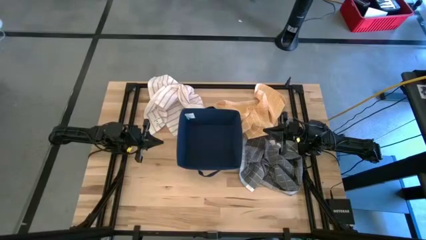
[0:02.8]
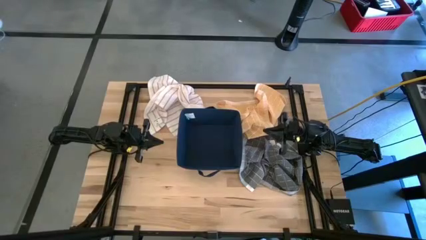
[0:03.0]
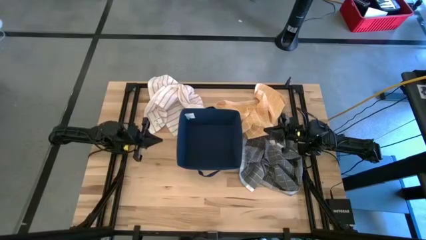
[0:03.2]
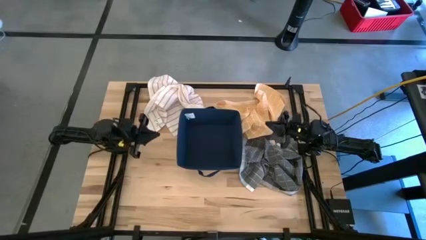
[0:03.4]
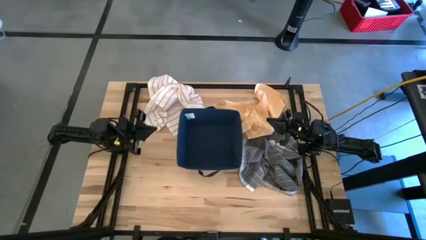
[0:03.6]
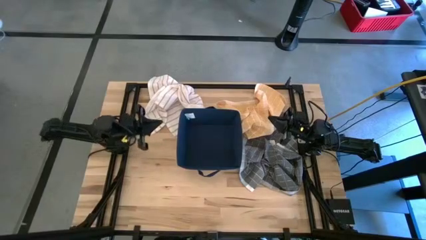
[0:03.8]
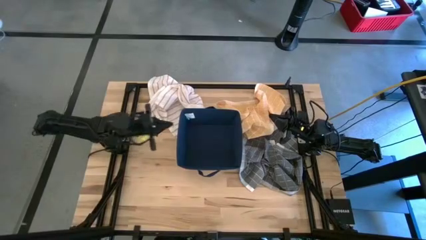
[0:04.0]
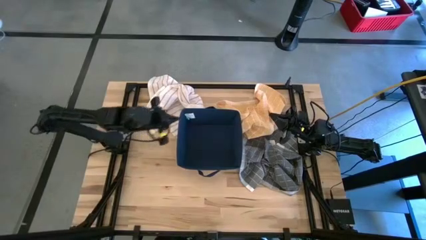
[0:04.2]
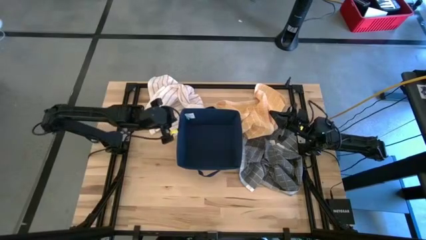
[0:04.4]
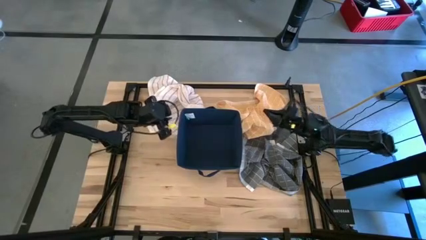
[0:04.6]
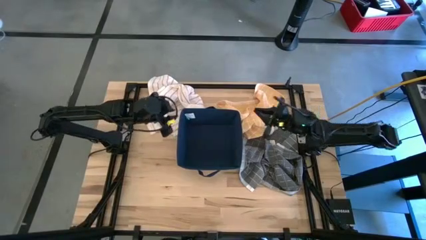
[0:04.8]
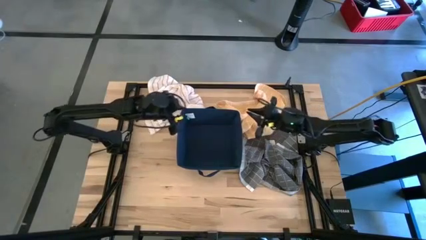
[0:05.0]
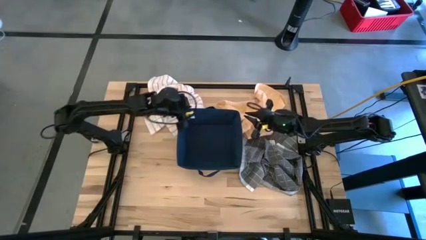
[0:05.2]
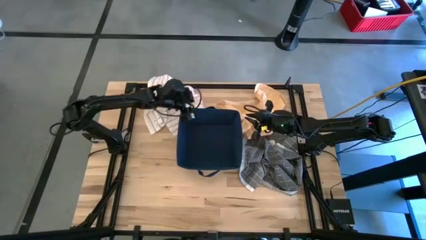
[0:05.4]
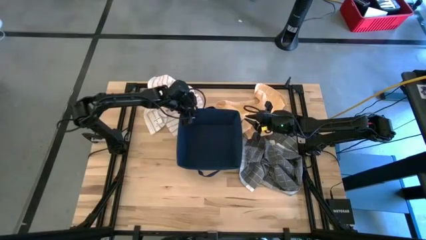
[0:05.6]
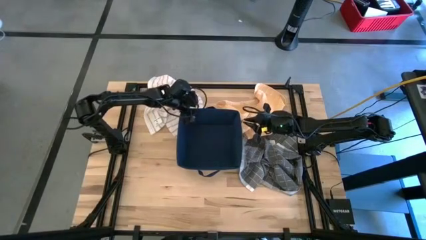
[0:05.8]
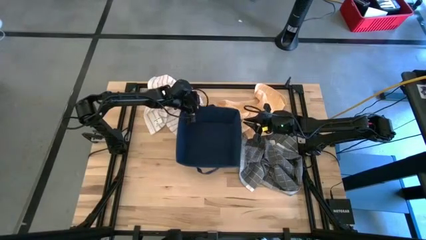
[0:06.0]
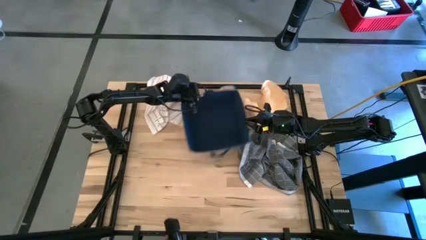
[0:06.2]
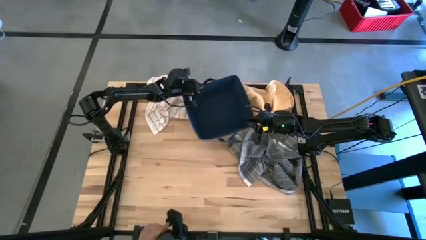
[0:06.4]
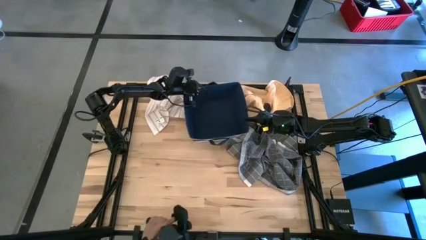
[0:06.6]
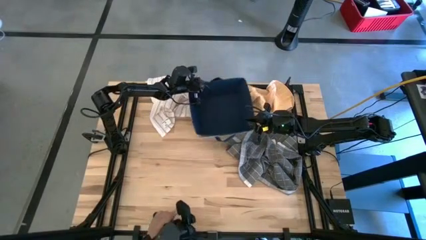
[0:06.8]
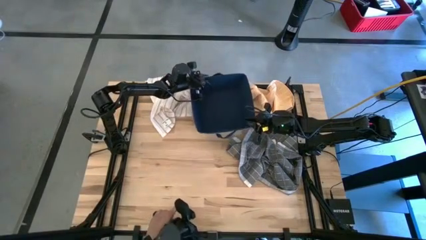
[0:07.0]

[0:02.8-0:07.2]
Task: Fold towel
Move the laundry organizer

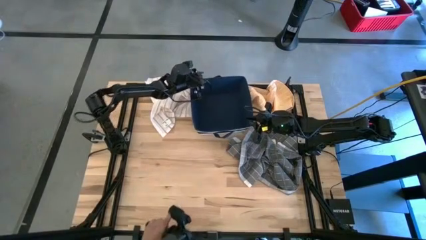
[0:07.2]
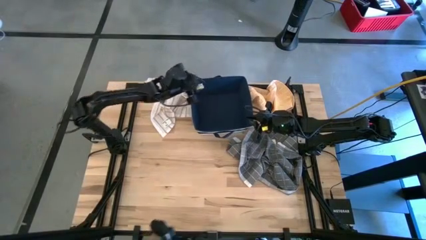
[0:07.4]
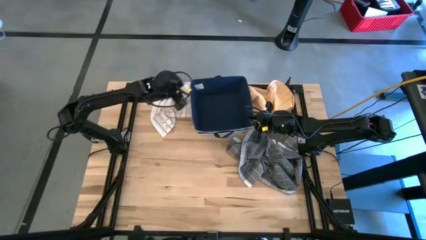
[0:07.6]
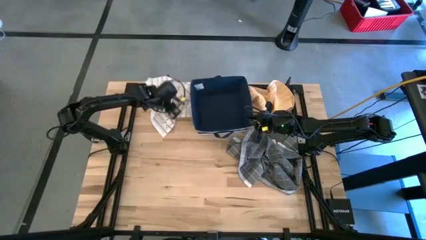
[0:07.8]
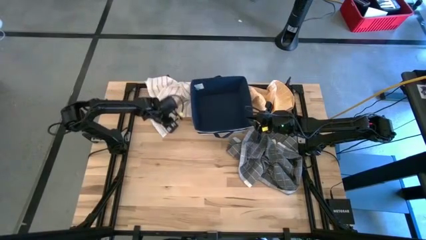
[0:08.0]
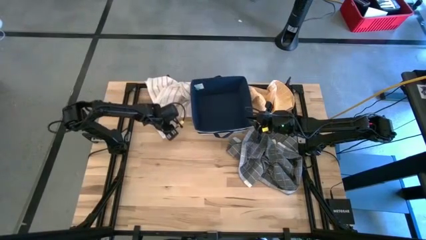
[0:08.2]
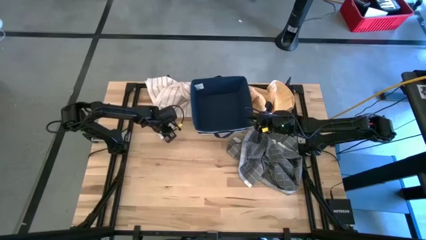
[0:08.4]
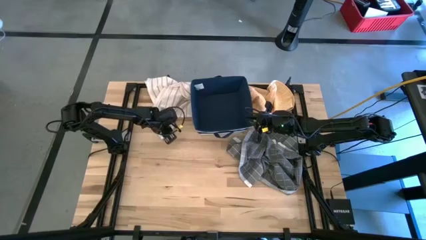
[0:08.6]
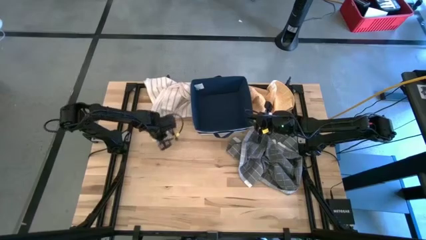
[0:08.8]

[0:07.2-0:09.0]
Fold the white towel

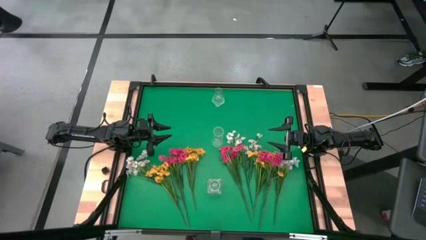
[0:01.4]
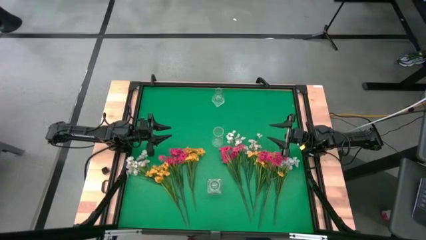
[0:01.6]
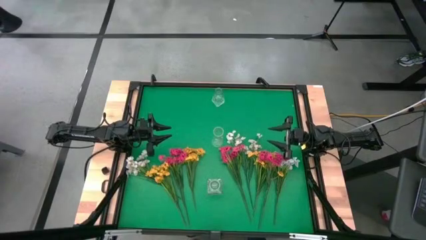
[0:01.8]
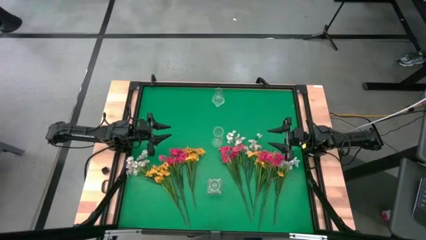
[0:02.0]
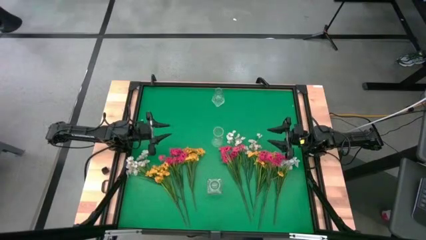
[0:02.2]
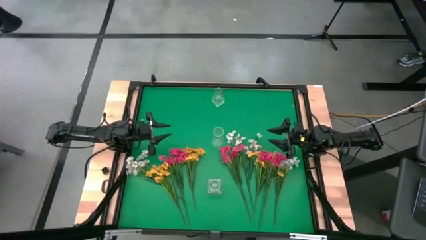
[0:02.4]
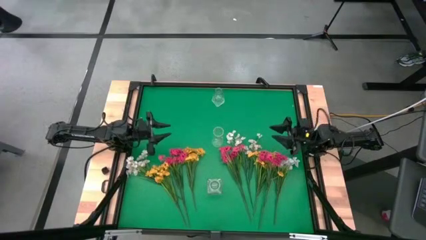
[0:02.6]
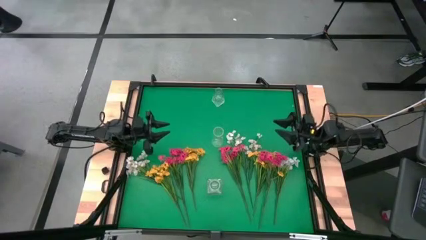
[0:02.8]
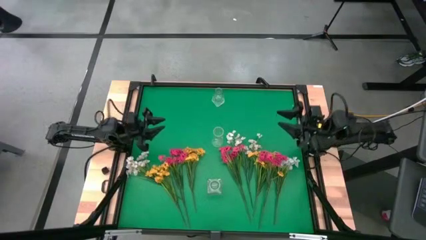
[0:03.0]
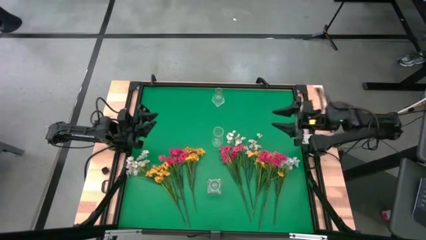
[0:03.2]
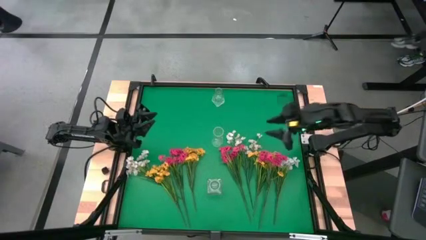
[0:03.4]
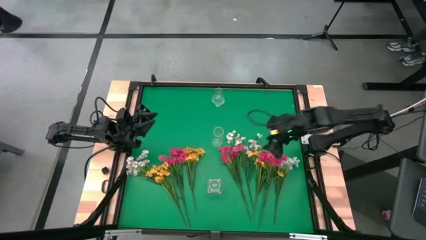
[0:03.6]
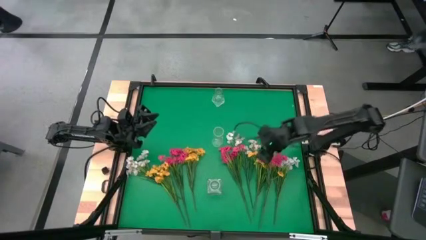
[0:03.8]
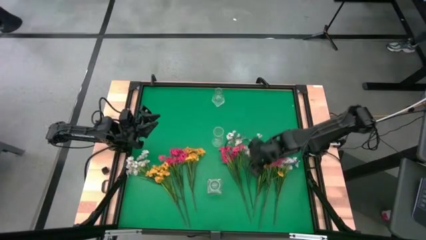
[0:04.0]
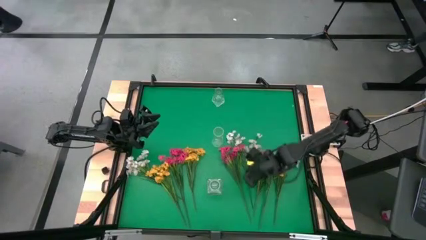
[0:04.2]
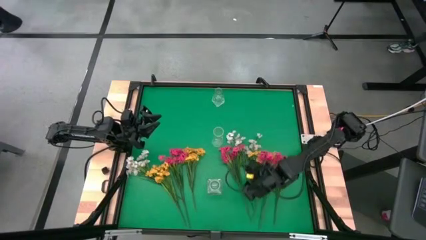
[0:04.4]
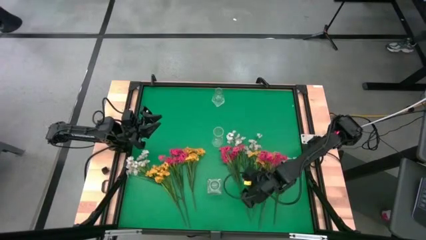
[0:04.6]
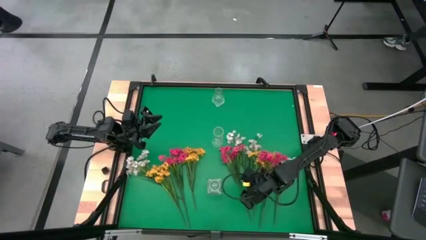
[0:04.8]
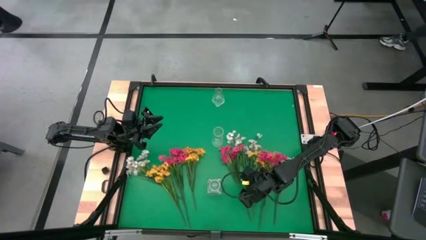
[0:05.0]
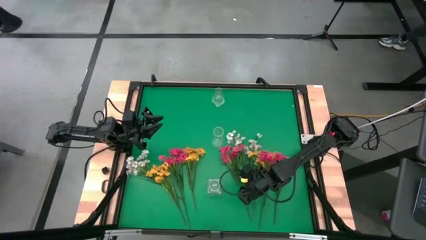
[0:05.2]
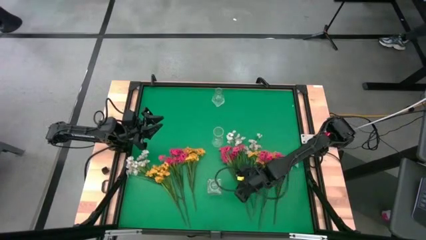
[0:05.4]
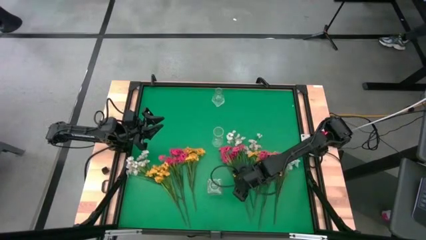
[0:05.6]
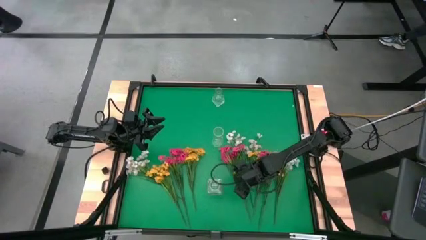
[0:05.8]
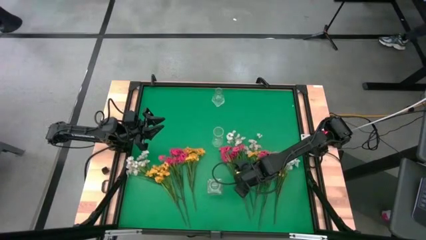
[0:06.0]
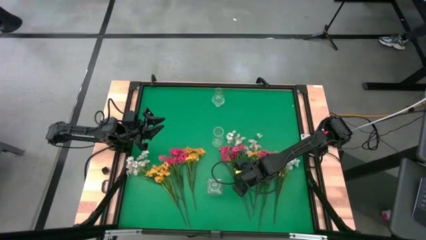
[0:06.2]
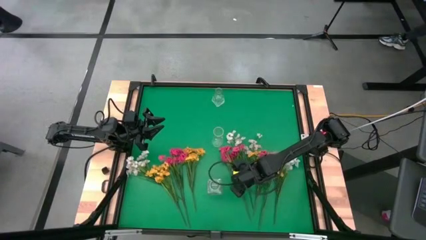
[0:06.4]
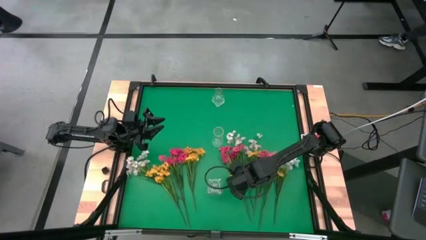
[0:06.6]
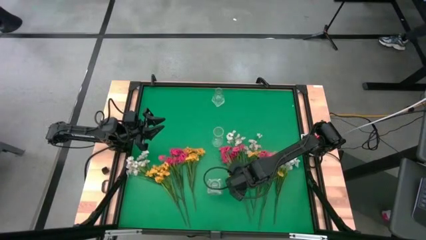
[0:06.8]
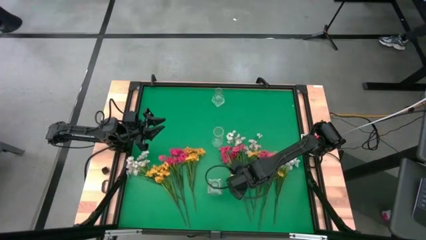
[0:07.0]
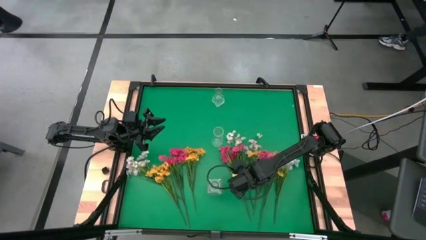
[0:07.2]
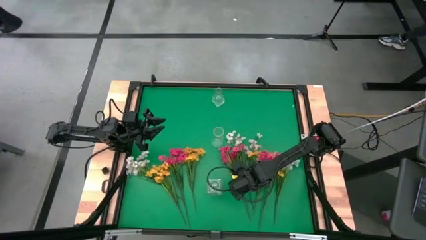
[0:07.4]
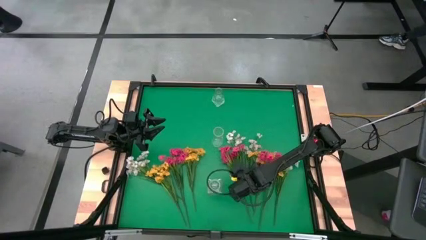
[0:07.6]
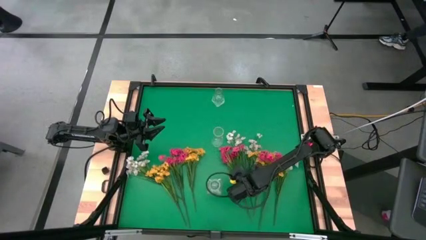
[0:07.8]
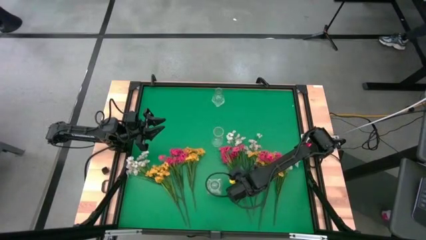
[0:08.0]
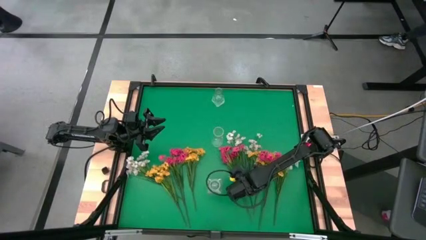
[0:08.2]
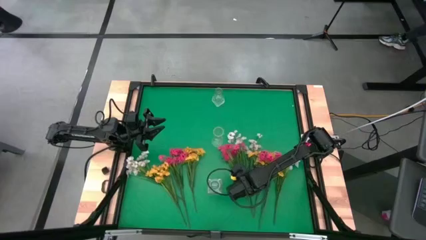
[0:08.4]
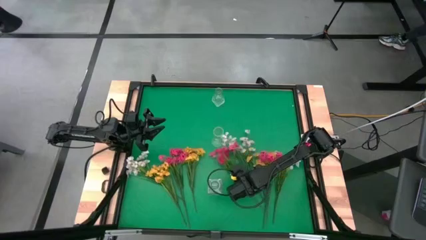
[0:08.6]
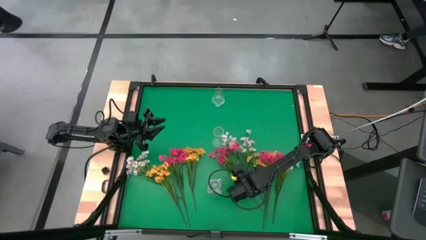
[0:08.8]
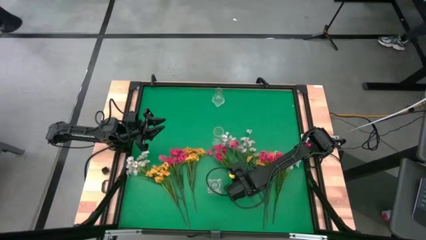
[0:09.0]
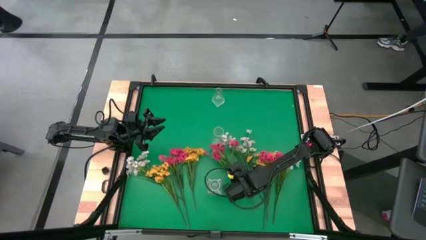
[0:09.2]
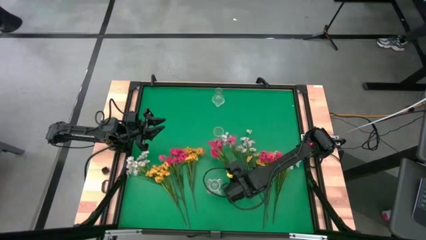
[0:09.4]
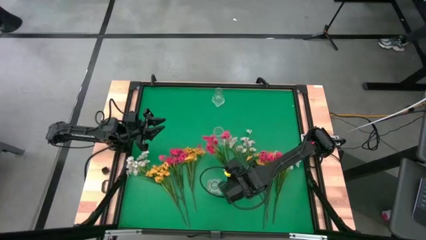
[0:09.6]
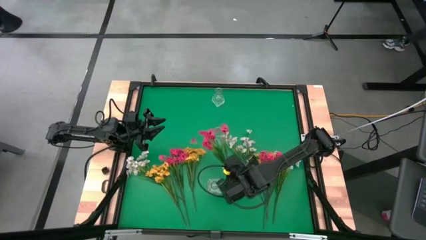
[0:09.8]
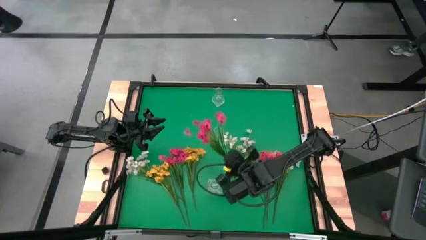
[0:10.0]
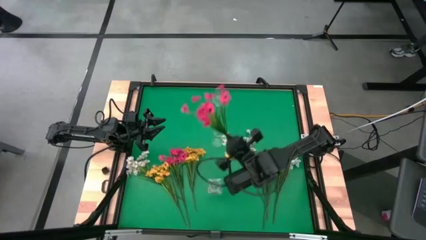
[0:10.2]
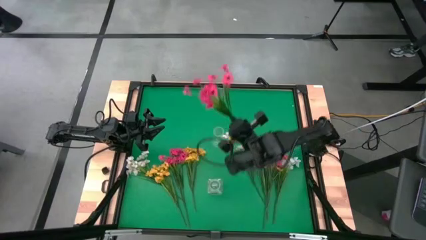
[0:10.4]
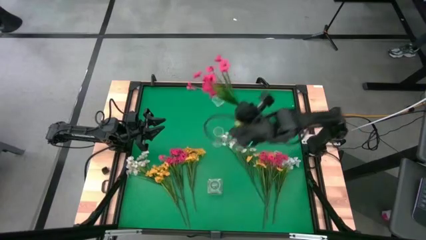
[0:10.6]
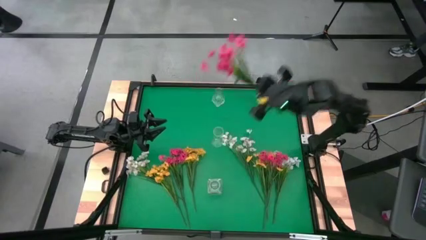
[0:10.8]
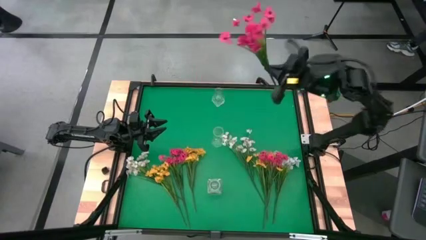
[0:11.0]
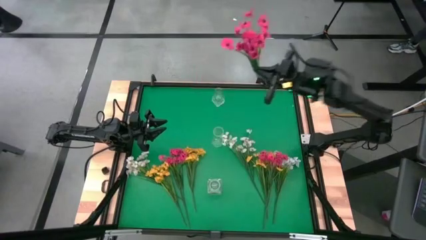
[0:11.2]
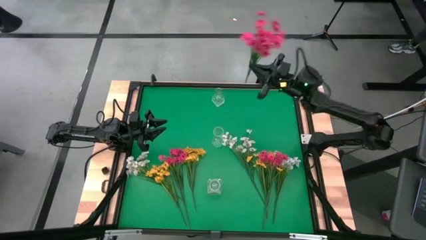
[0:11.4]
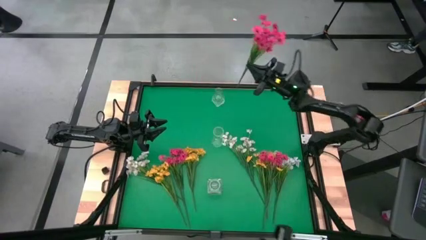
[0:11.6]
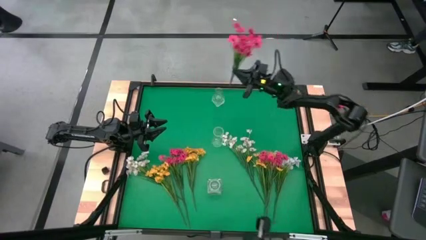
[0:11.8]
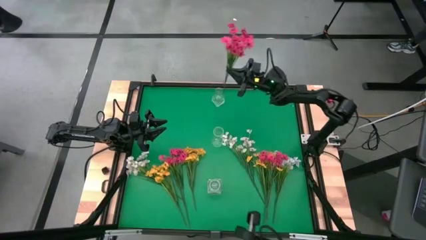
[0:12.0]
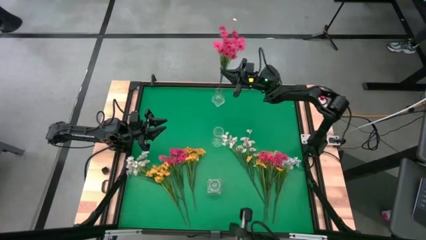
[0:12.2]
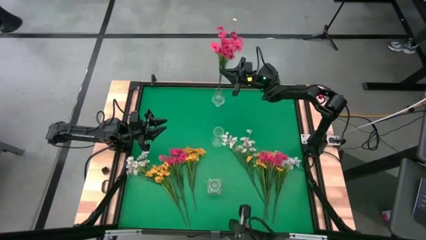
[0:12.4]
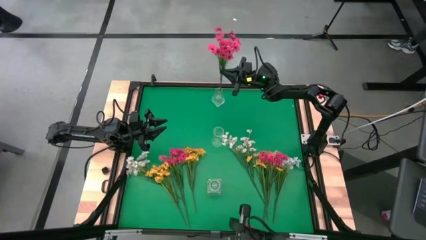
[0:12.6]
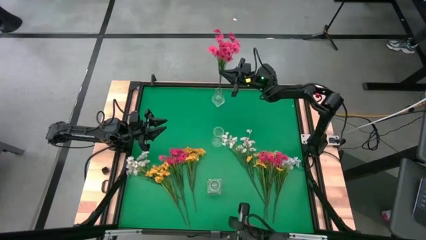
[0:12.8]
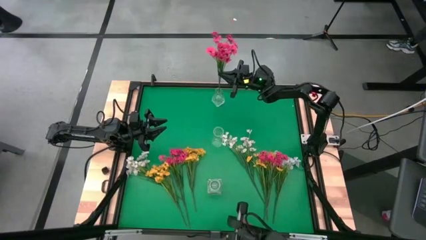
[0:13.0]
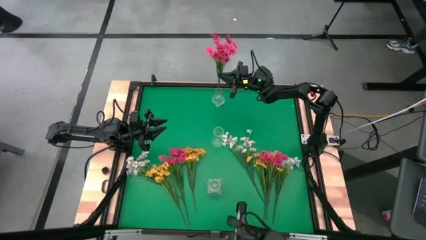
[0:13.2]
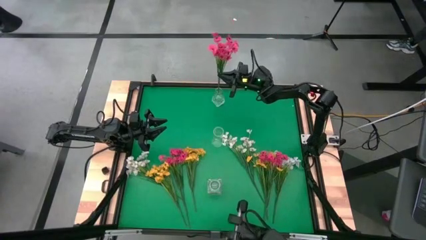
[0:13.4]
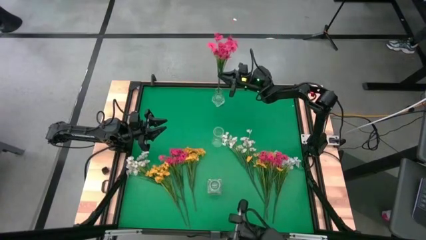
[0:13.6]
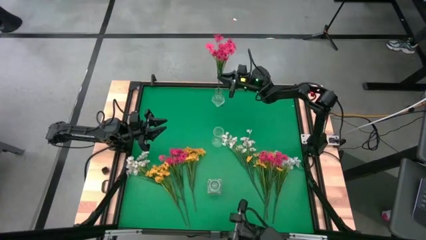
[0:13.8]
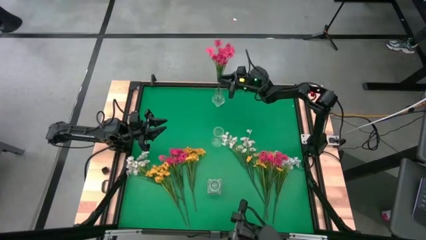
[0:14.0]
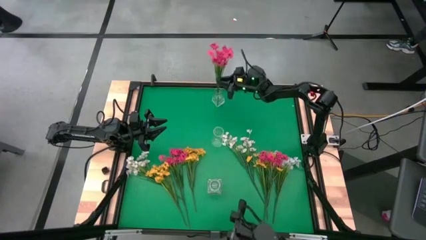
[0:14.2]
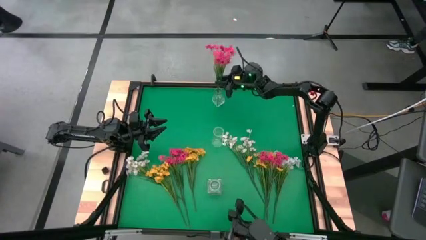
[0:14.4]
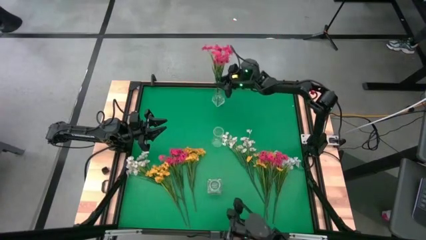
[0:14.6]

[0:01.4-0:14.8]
Task: Sort flowers into vase by color
Put the middle pink flowers into the top transparent vase
